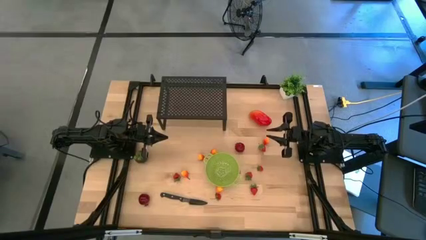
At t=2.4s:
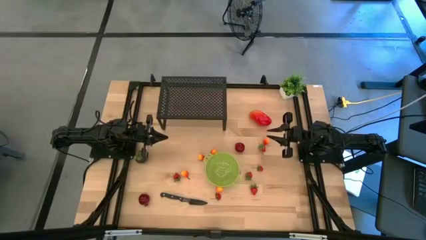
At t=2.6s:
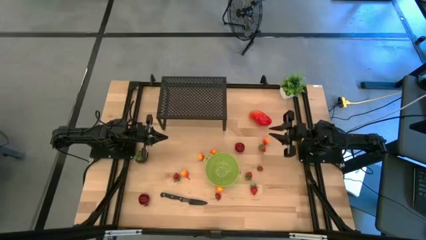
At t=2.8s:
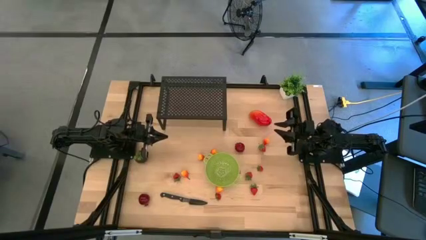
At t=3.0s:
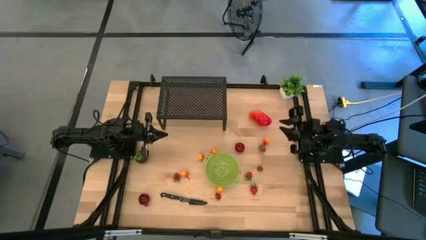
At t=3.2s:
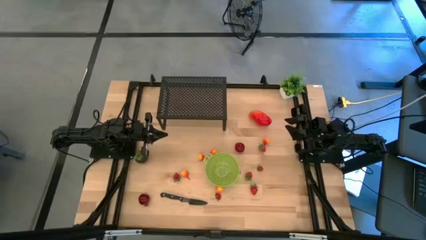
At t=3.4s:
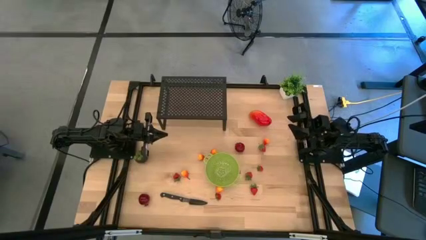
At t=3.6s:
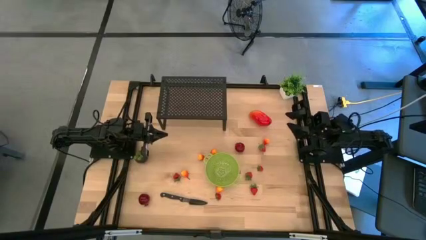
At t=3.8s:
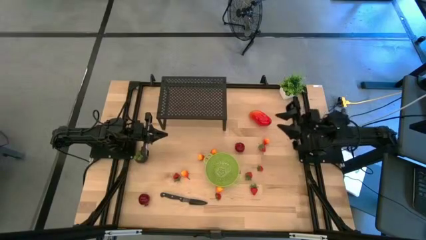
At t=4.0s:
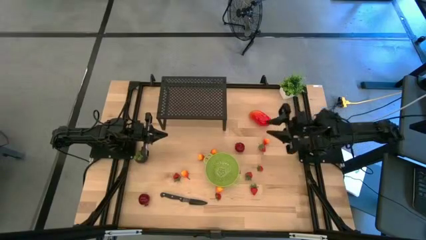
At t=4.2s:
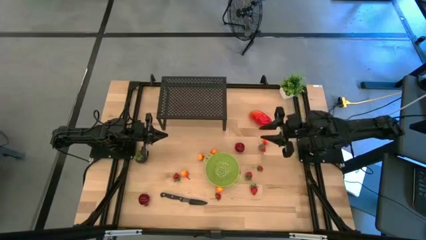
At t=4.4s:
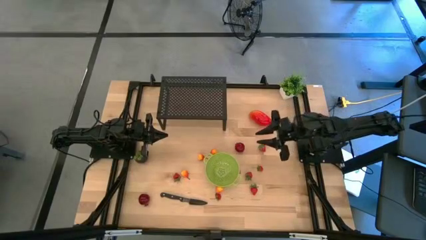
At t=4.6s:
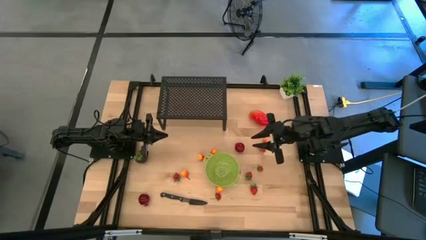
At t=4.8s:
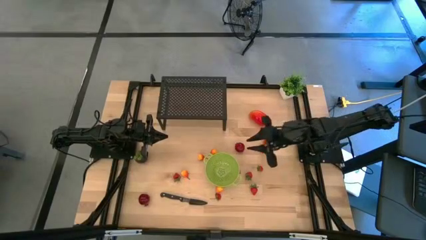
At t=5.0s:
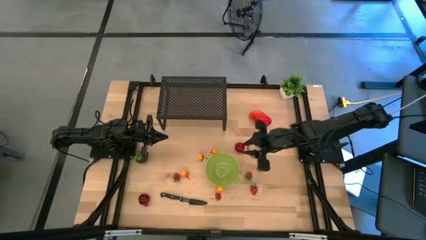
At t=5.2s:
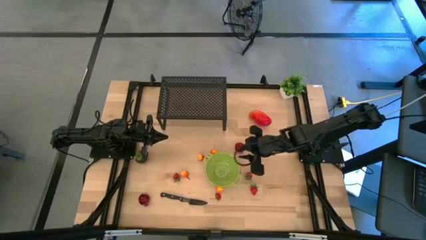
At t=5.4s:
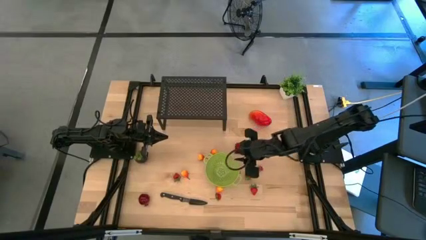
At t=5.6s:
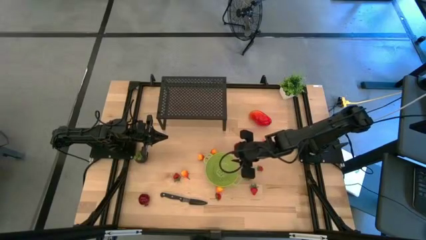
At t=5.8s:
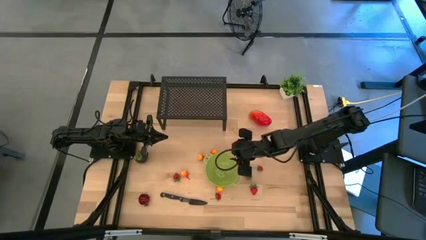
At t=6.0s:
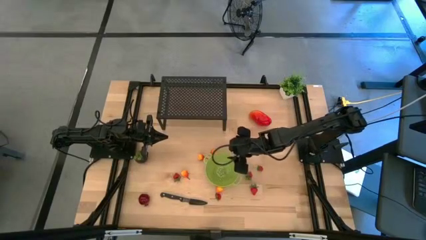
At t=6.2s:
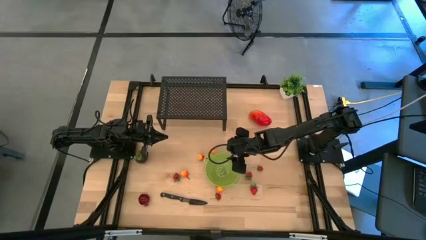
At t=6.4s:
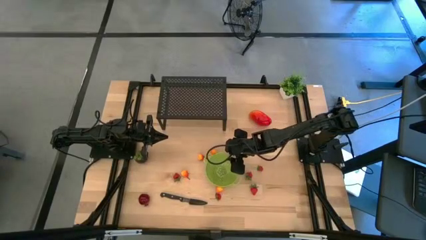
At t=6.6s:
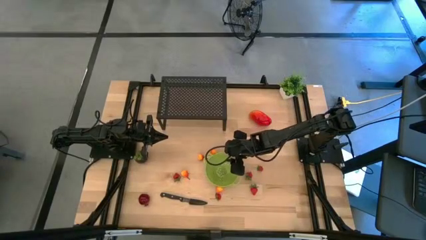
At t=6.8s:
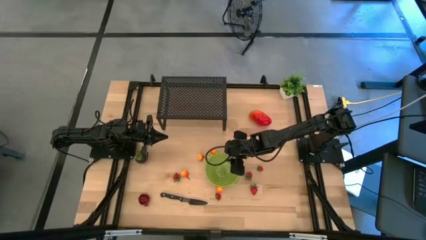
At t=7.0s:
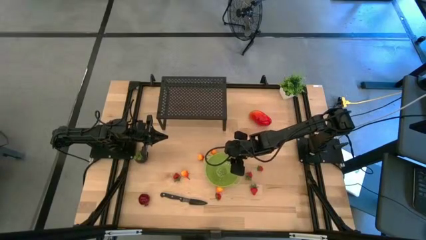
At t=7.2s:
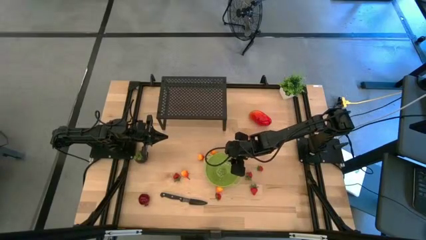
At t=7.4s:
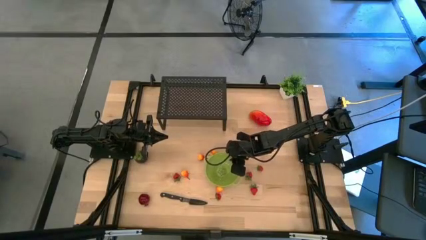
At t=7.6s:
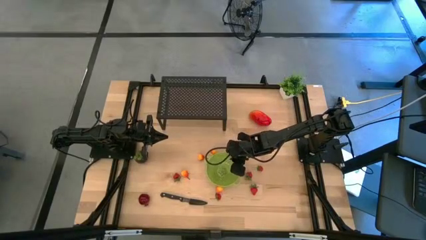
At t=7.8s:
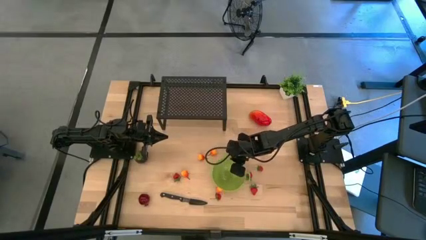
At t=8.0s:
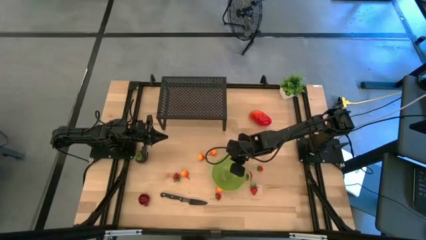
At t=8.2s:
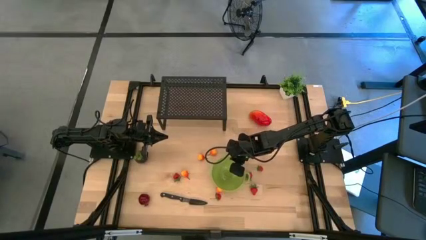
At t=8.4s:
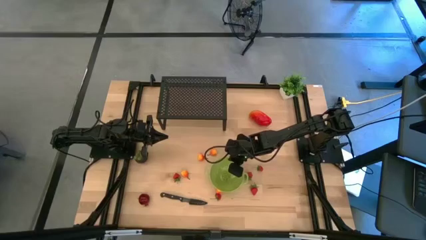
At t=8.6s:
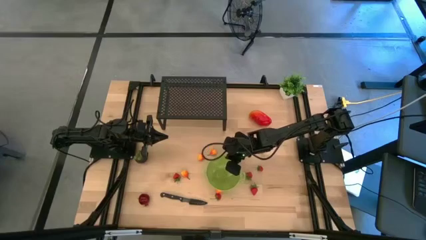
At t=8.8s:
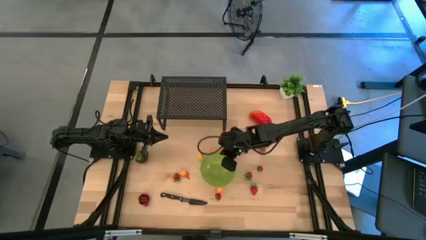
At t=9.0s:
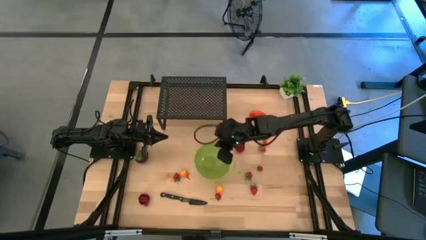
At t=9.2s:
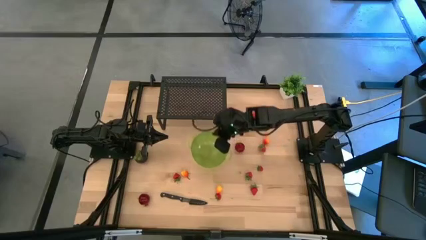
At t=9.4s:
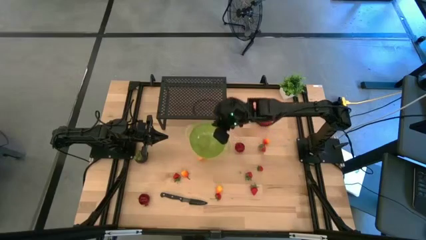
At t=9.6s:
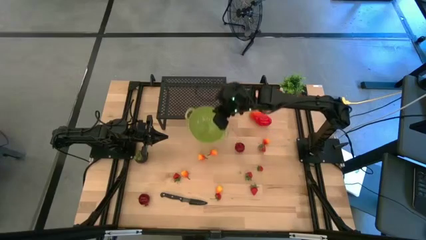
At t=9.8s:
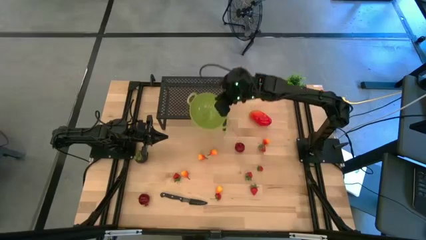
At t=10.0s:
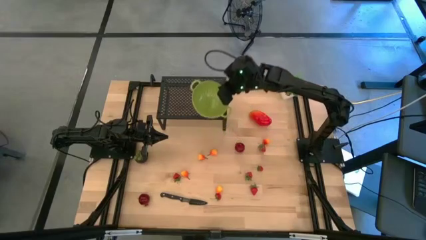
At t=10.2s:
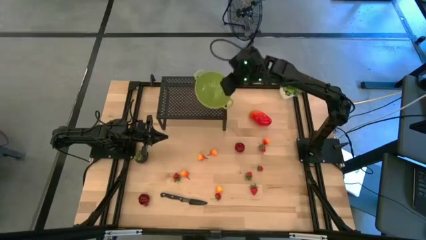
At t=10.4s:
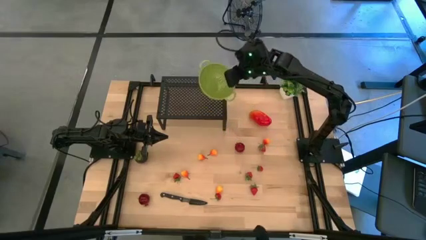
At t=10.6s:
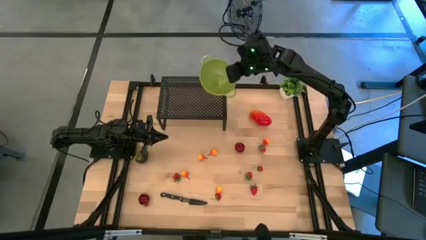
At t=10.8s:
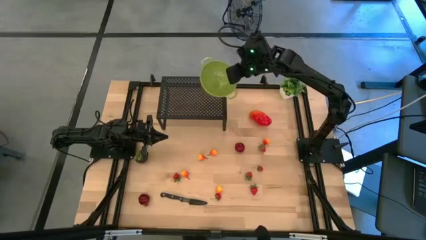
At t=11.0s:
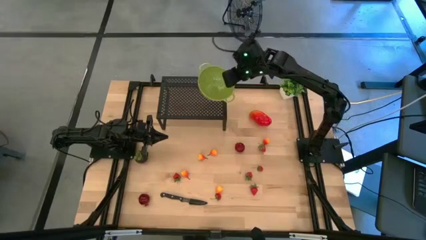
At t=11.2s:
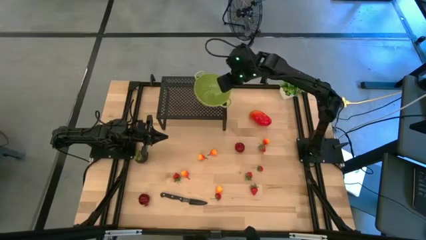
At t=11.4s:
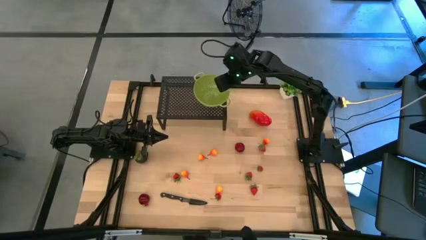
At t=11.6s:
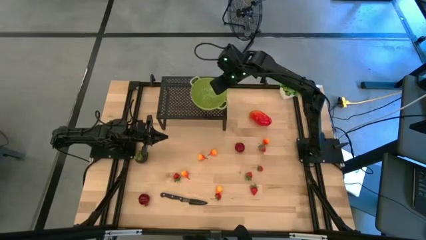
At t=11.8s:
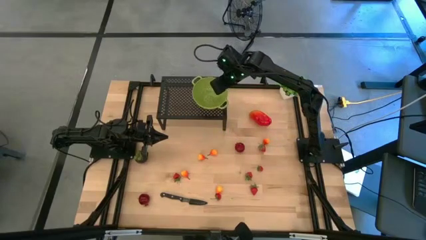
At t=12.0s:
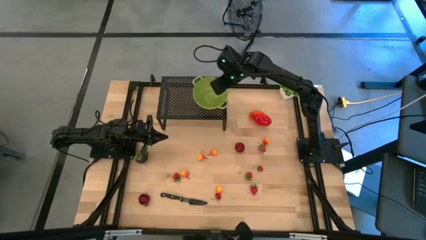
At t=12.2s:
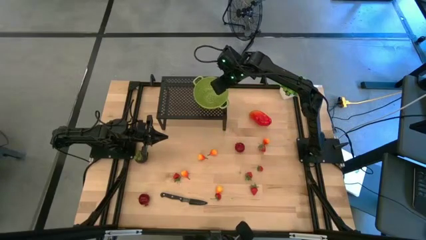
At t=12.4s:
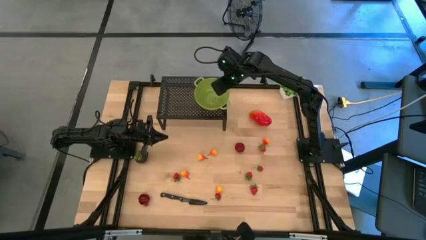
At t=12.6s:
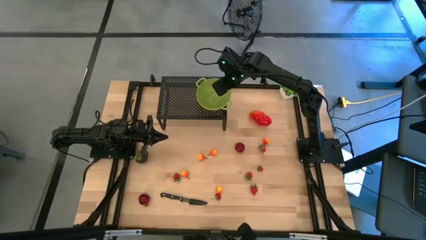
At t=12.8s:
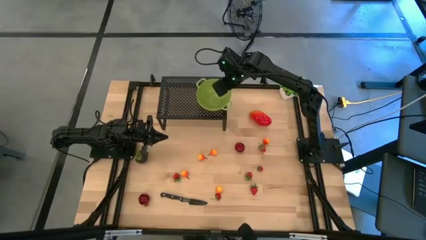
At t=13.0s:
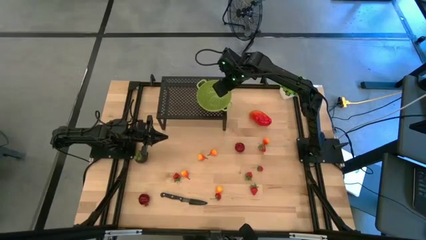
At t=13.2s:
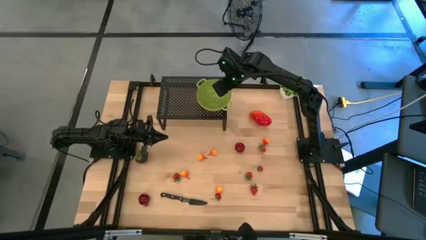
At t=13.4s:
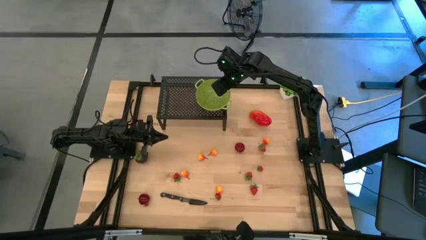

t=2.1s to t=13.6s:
Task: Pick & Place Fruit
Put the green strainer bowl on the shelf

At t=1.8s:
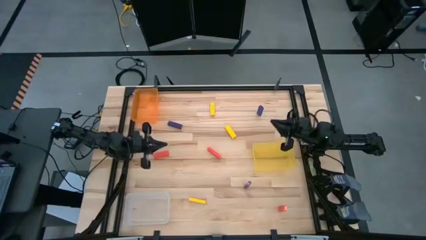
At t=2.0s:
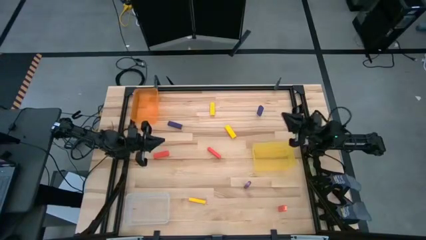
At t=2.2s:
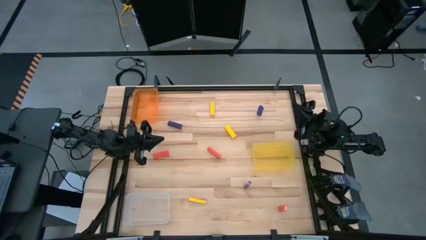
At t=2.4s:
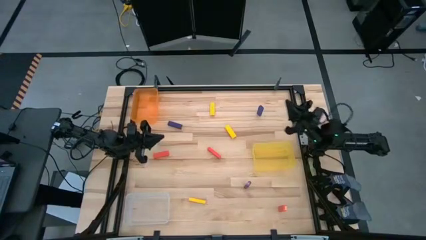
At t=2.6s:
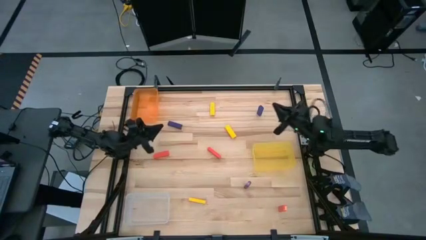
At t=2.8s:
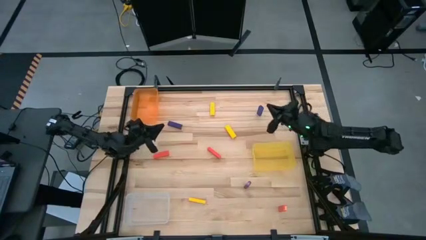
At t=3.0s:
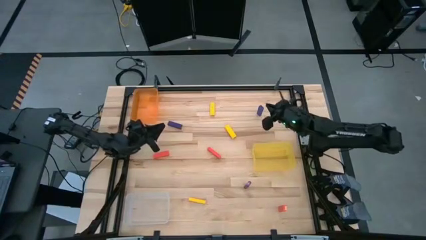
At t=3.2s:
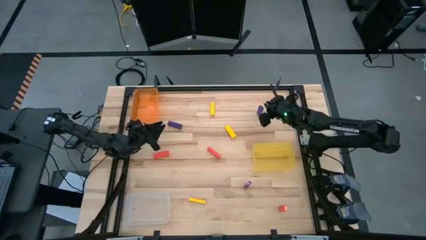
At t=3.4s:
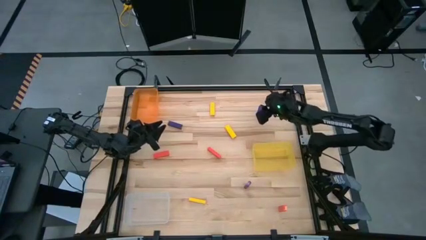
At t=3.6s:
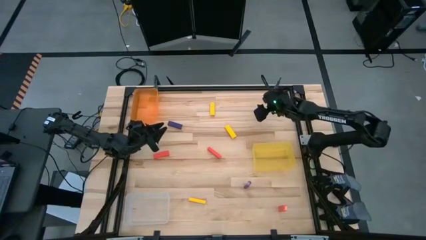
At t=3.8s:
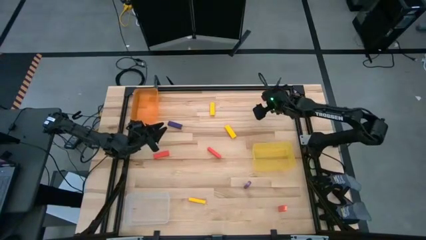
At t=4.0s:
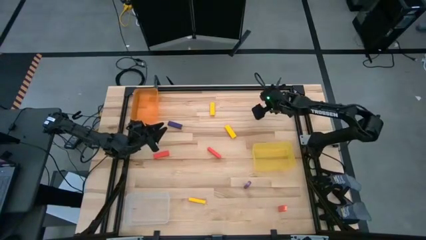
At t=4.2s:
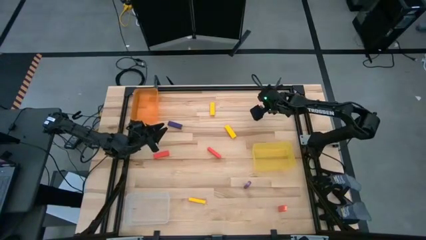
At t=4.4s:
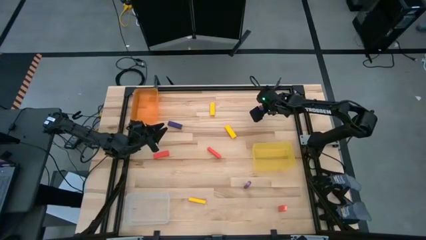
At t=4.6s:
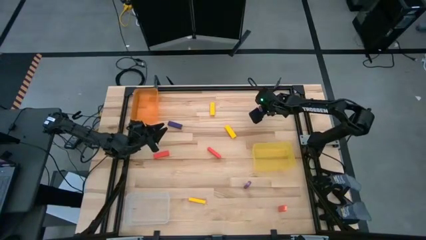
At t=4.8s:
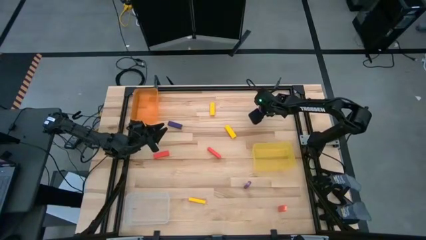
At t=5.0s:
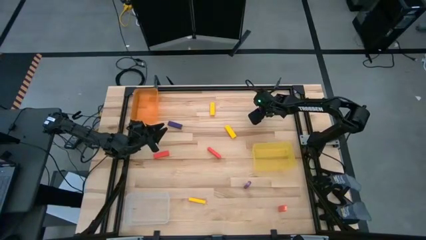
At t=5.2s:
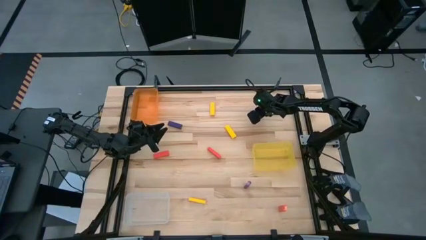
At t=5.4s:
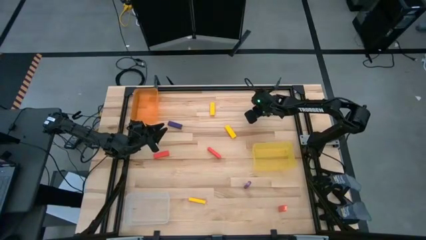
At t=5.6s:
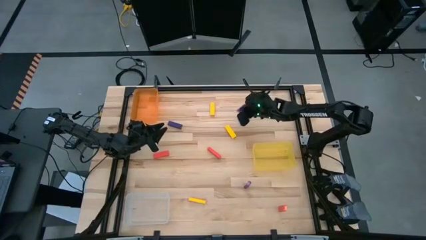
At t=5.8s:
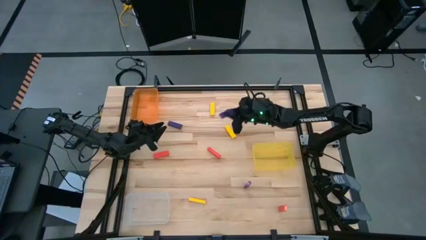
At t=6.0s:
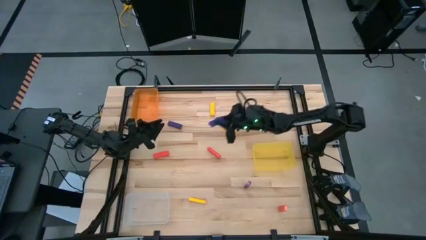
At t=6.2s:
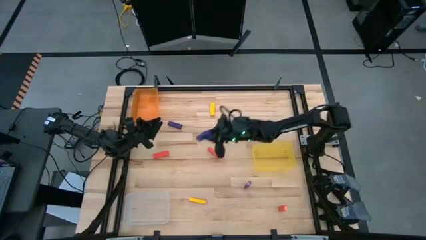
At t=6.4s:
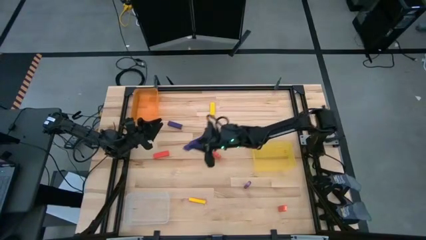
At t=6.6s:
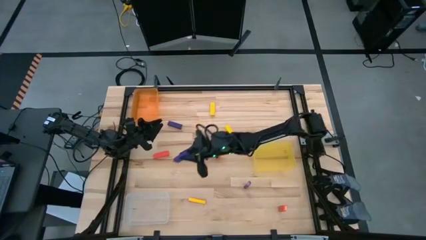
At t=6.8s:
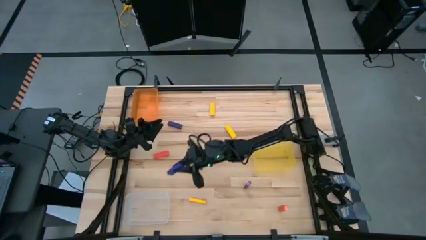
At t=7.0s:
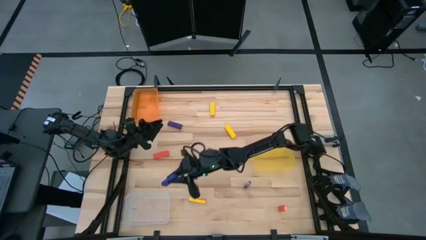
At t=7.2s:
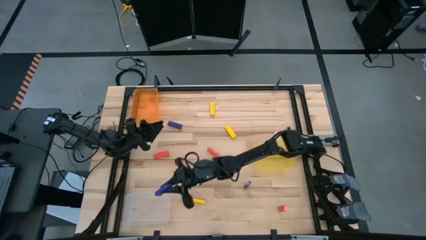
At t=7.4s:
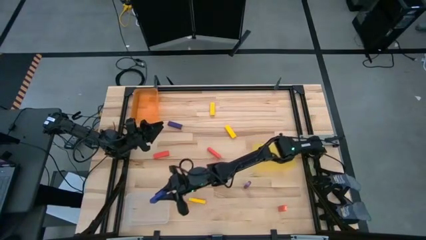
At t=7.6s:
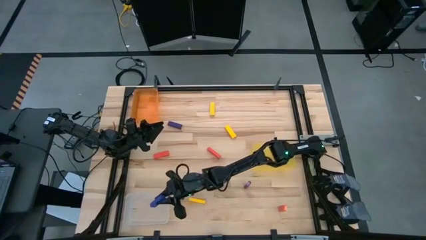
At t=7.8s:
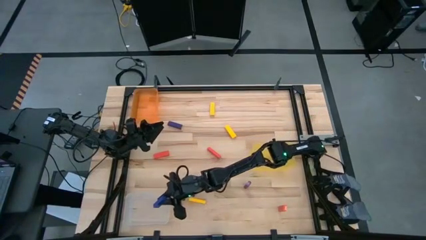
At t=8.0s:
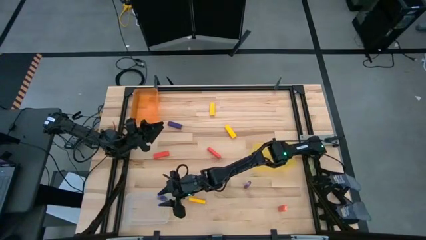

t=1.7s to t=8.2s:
Task: Sort blocks
Put the top right purple block into the transparent bin
